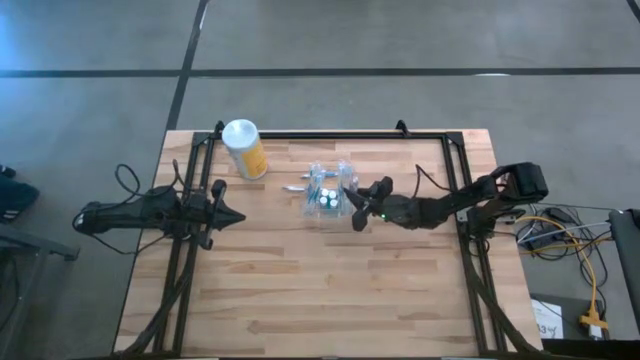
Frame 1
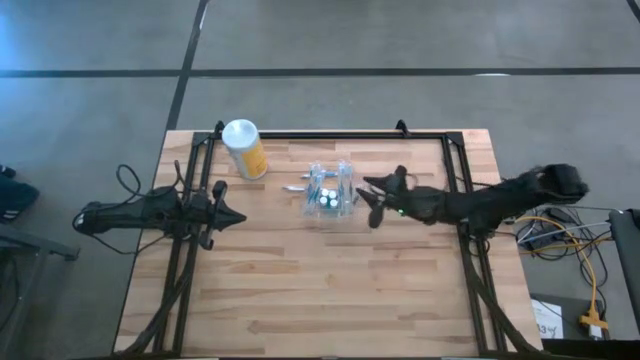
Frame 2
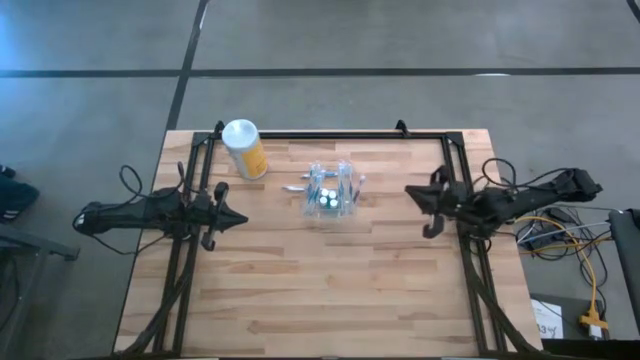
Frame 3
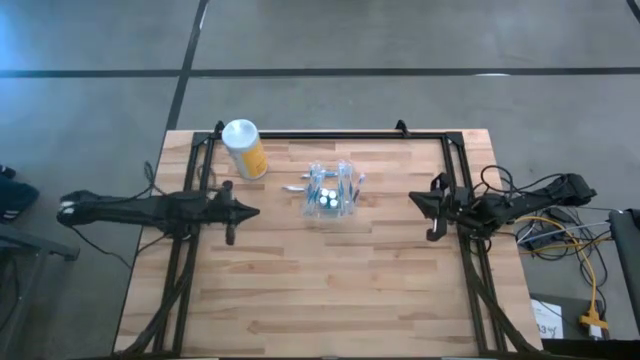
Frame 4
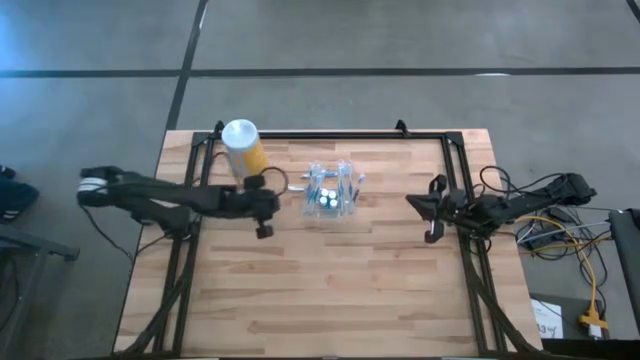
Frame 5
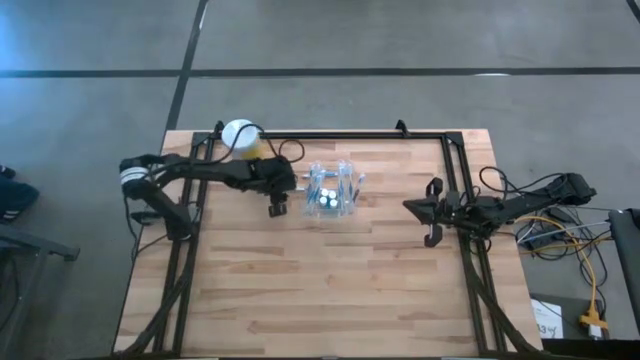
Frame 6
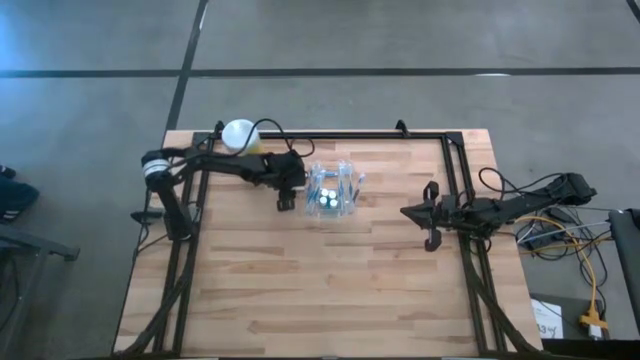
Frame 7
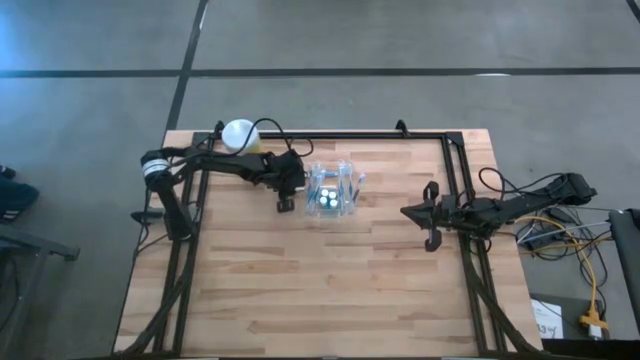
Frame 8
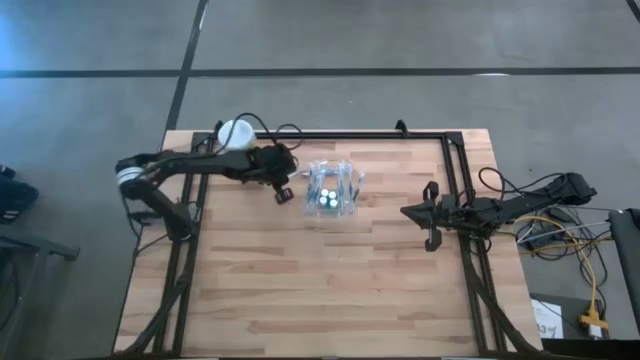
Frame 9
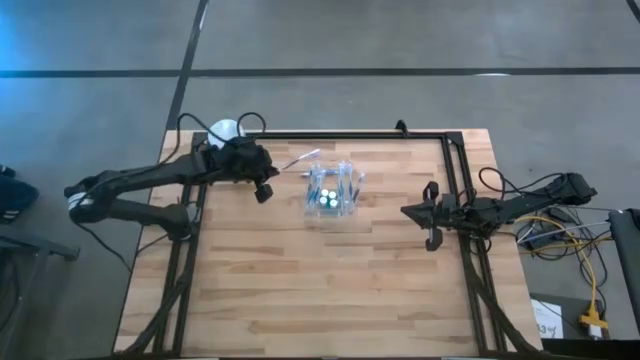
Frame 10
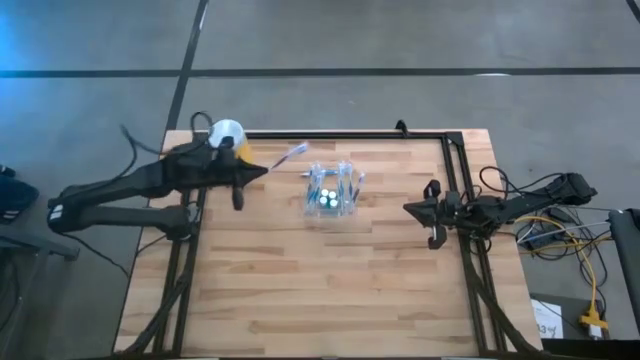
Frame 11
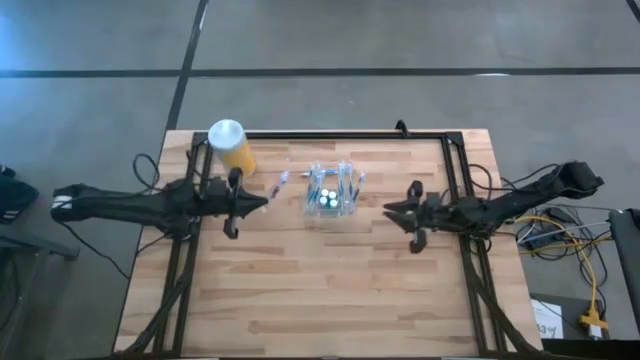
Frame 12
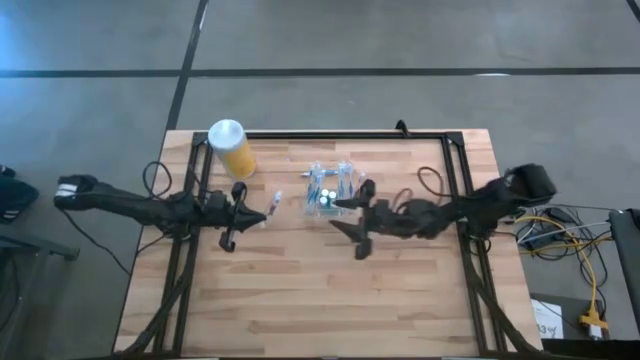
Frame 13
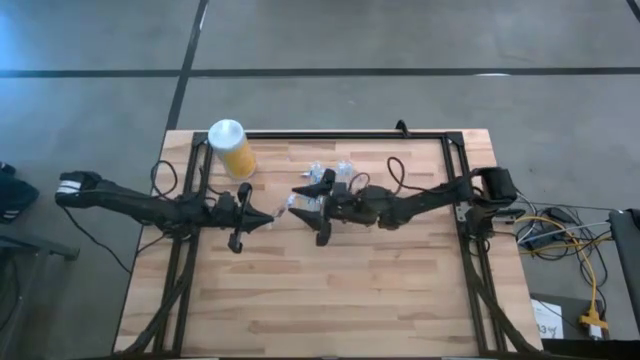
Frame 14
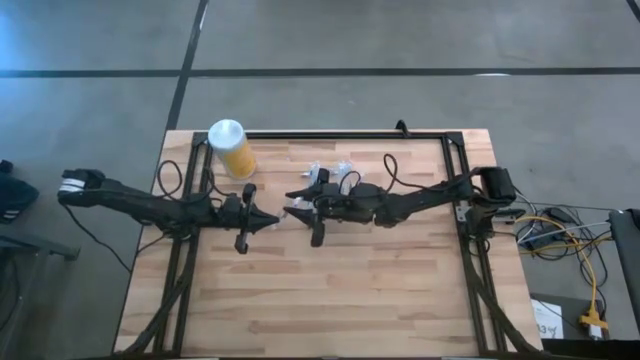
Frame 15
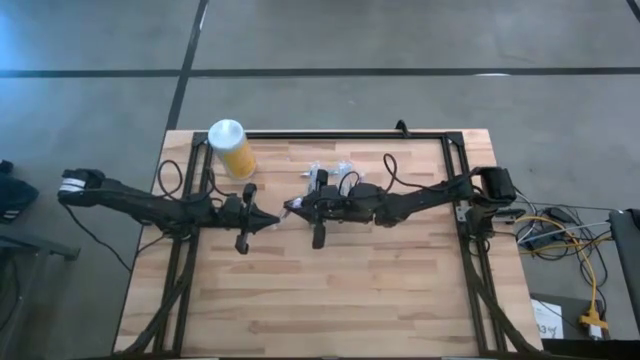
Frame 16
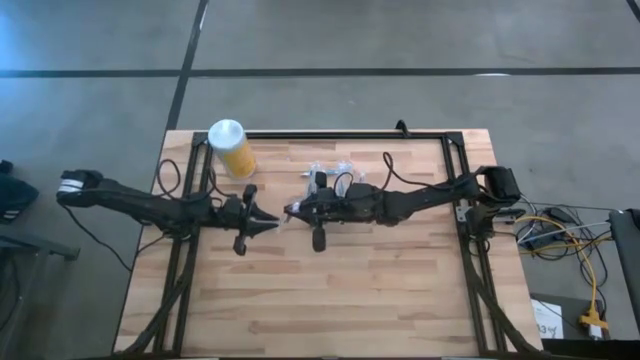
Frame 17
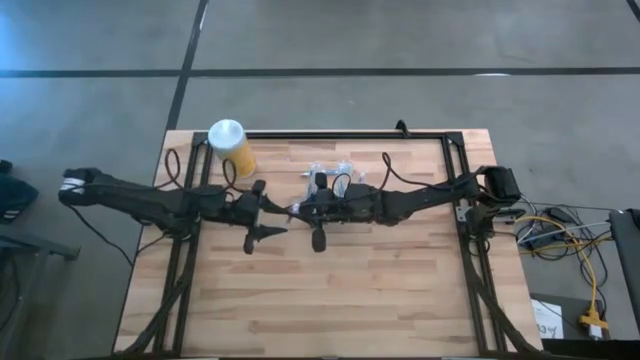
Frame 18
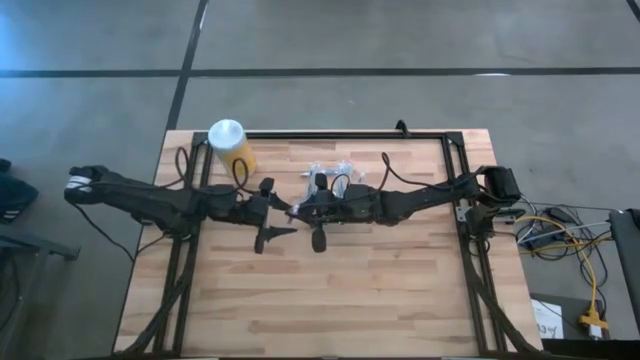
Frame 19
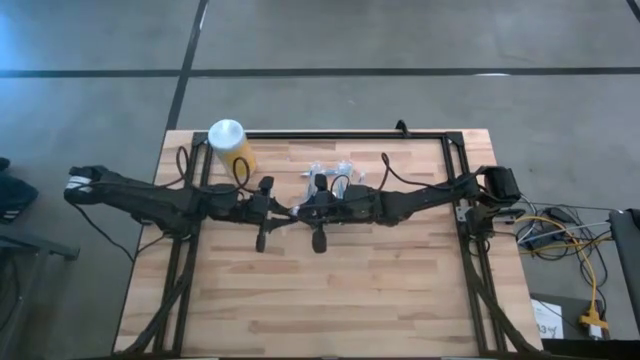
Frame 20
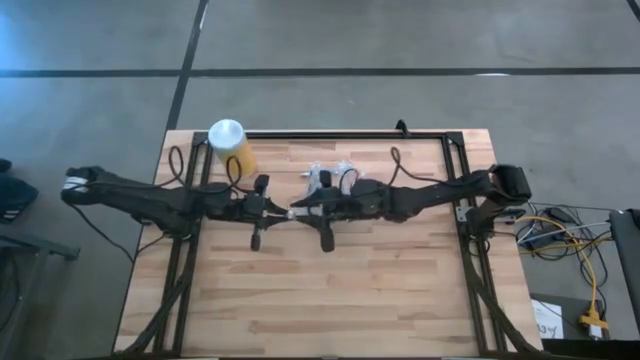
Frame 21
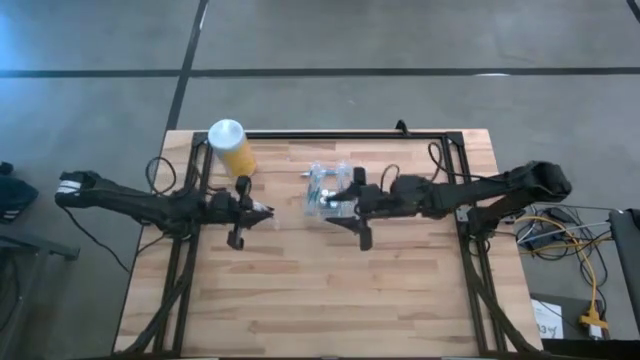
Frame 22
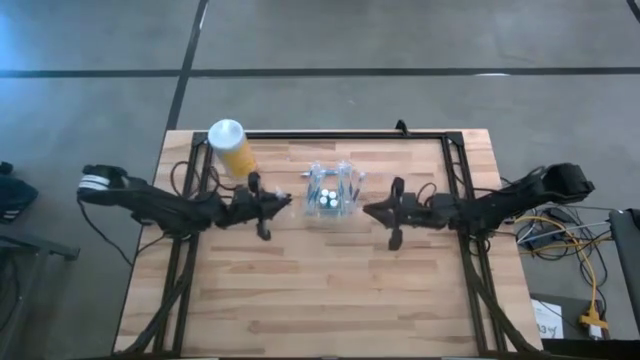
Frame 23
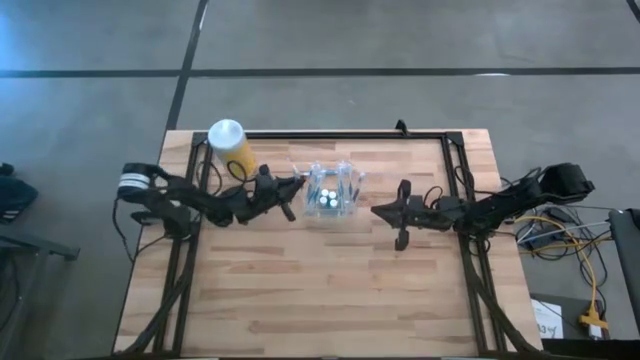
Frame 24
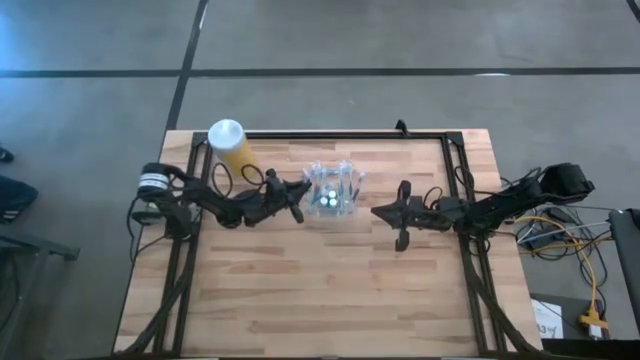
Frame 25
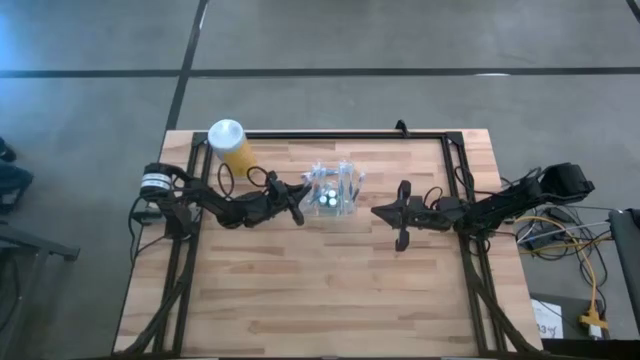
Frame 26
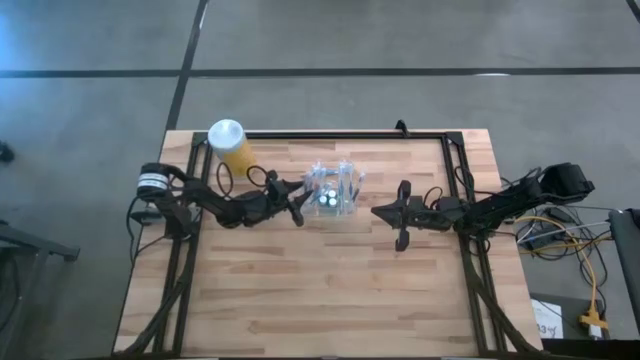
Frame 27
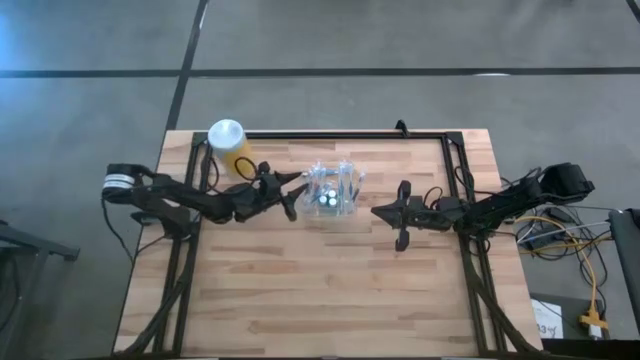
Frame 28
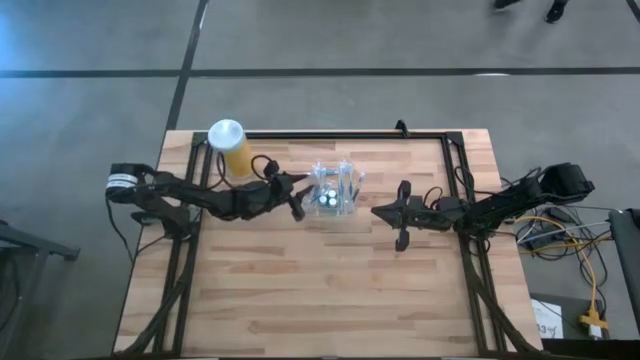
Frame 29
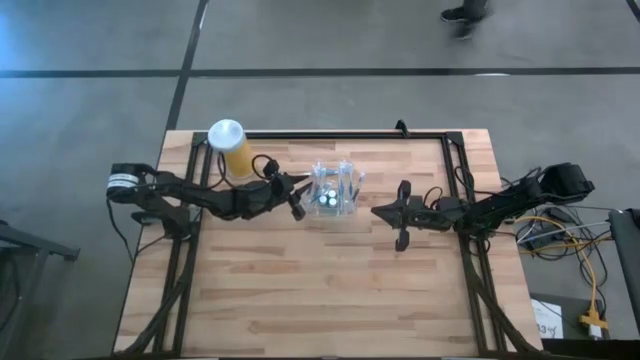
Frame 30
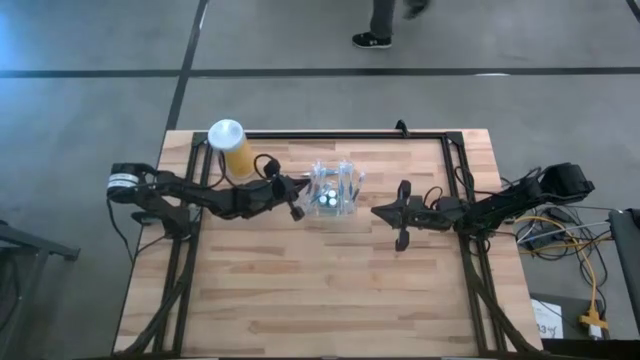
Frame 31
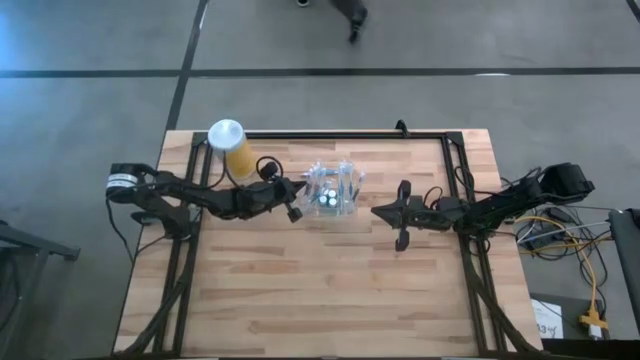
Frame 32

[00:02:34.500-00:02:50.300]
Task: Pick & Place toothbrushing station
Put the purple toothbrush into the left section of the transparent organizer

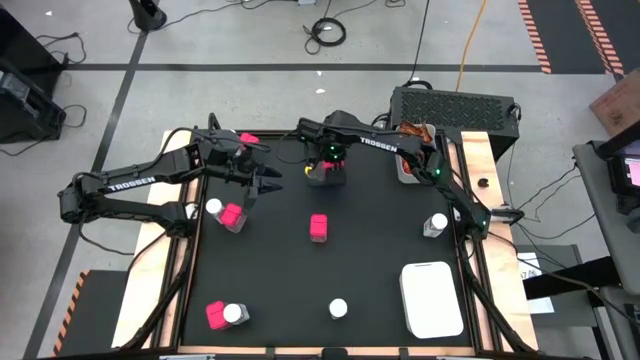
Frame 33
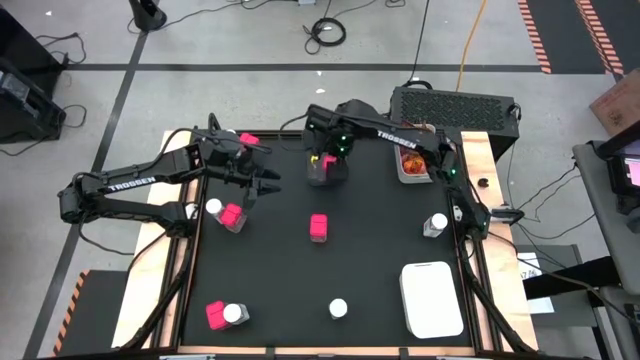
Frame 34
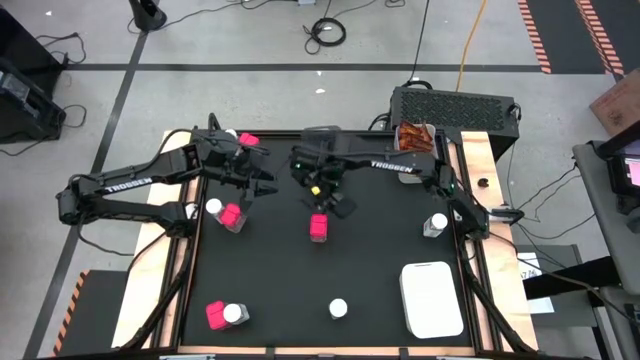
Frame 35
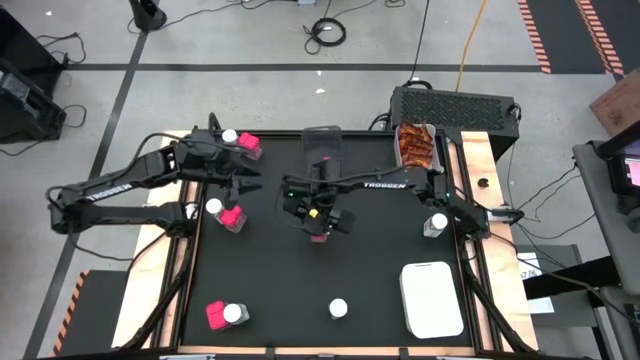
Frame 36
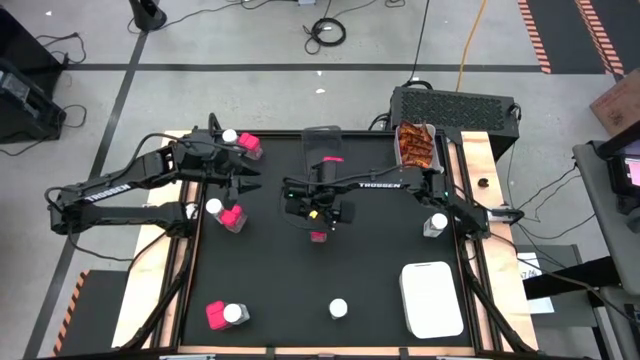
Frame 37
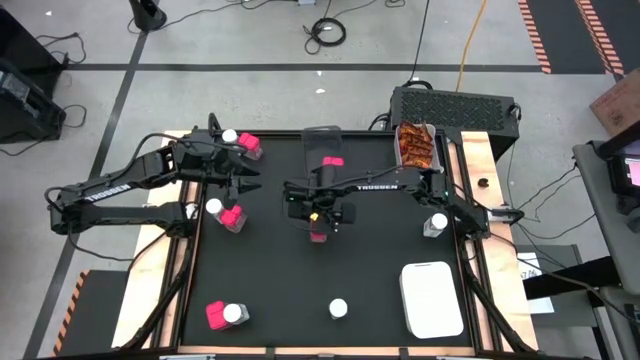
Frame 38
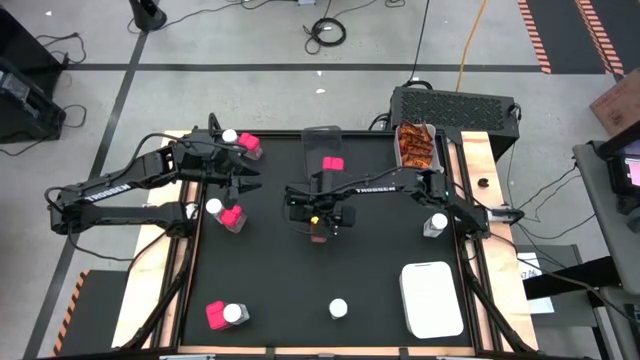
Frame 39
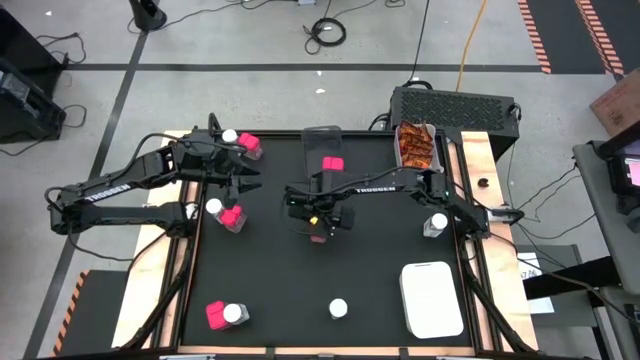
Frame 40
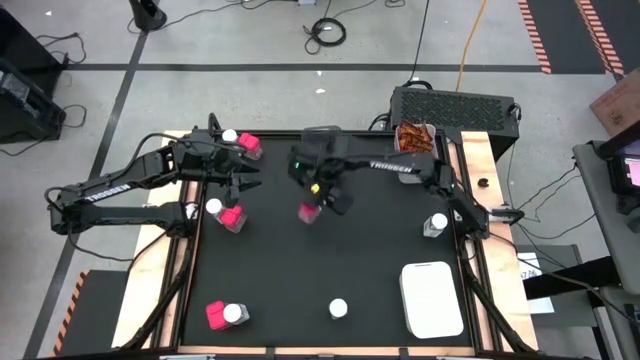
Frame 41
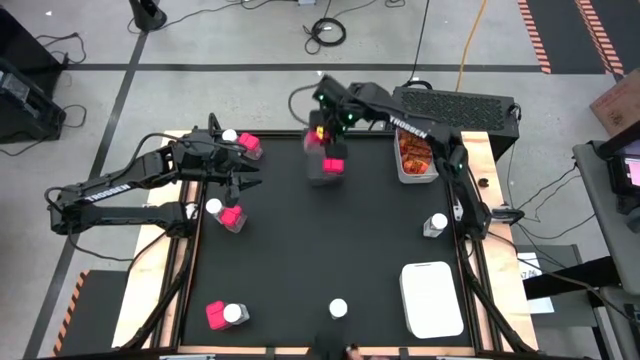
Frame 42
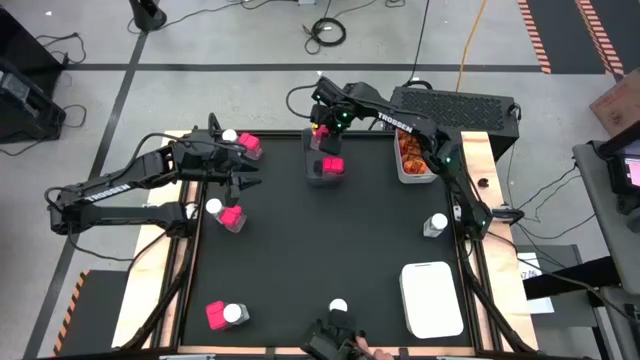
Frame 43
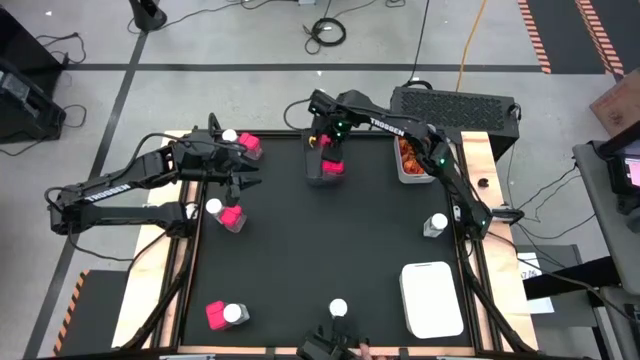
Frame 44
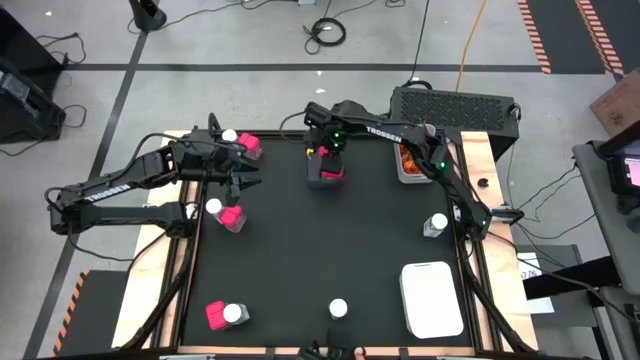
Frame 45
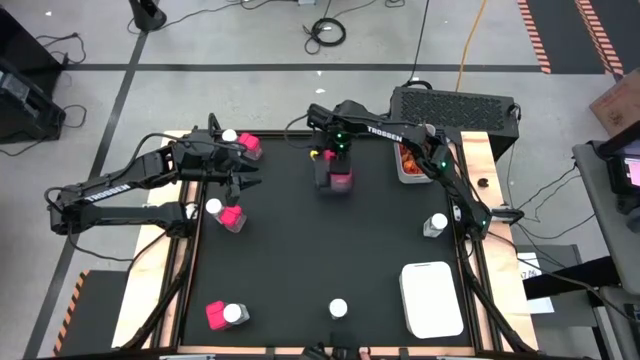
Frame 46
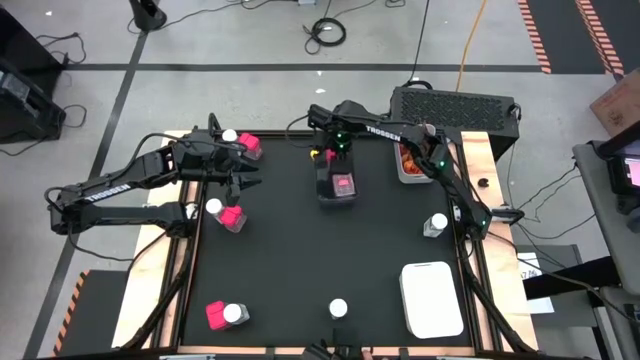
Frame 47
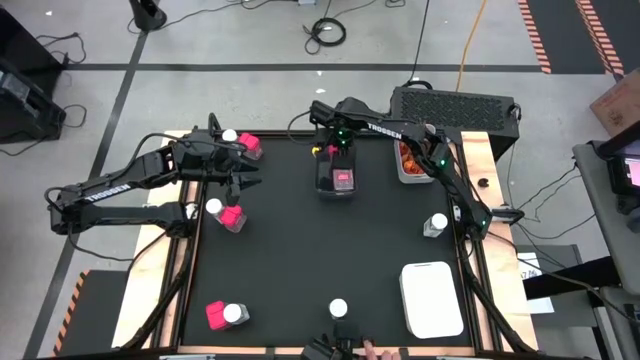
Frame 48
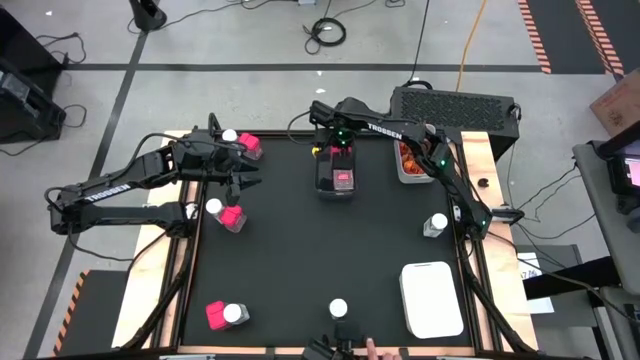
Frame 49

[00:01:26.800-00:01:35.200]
Task: Sort spices by type
Put the red seasoning can into the black transparent bin
